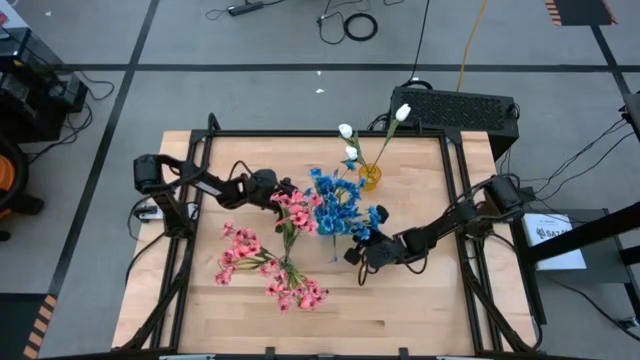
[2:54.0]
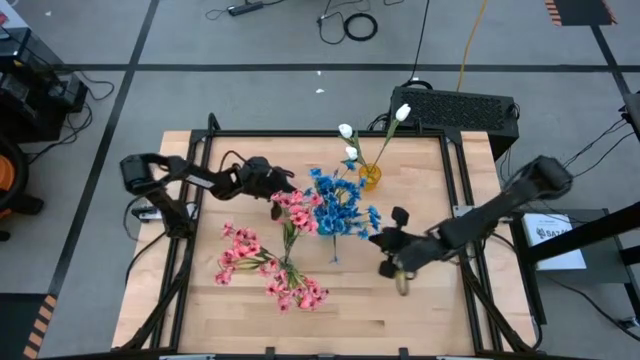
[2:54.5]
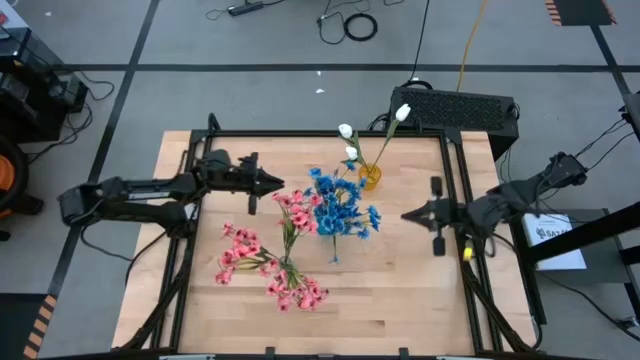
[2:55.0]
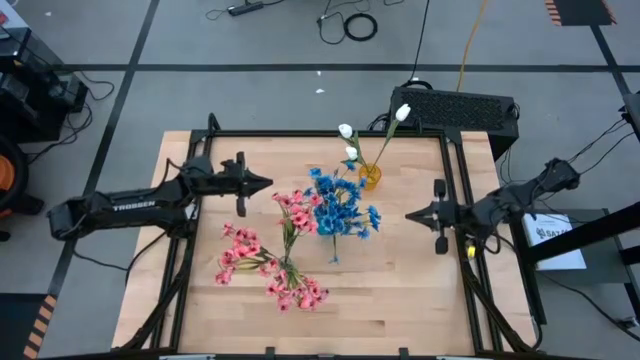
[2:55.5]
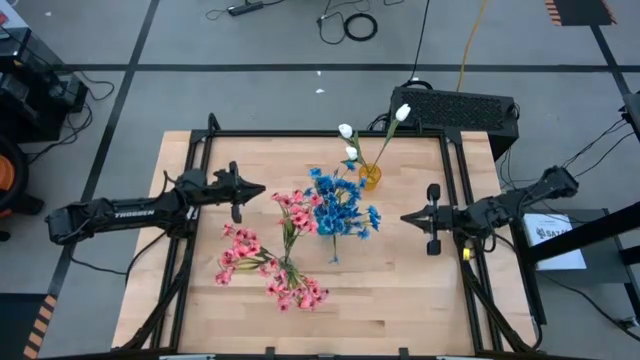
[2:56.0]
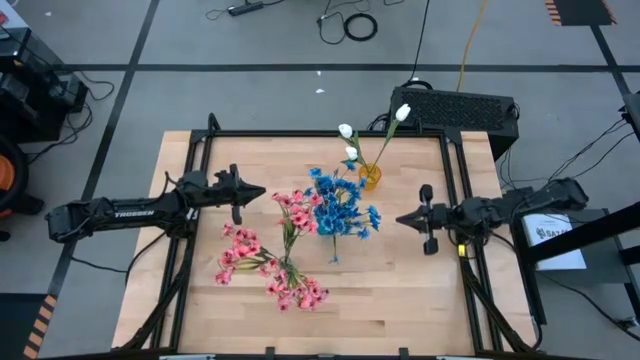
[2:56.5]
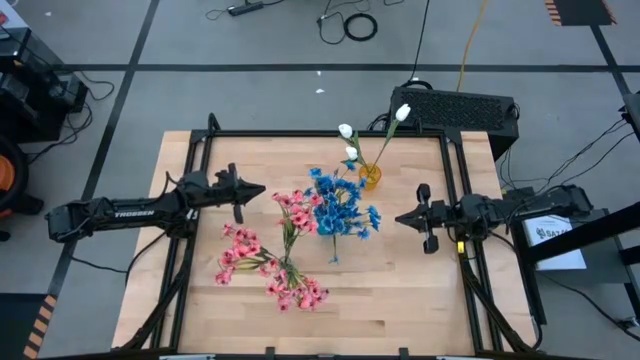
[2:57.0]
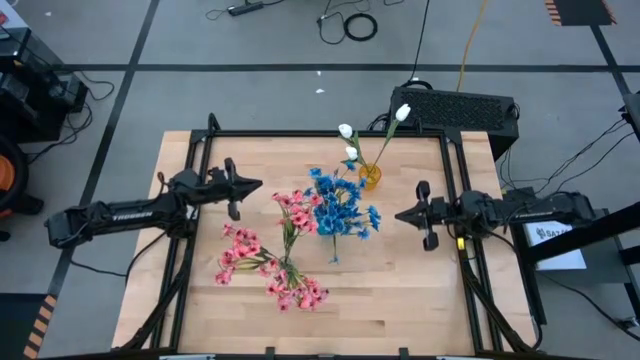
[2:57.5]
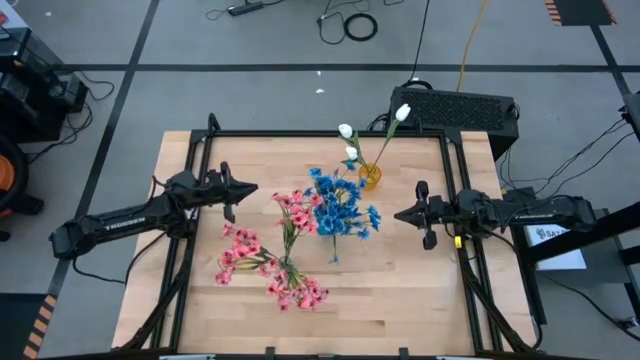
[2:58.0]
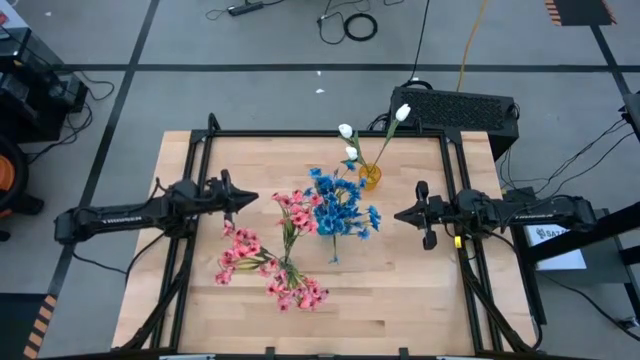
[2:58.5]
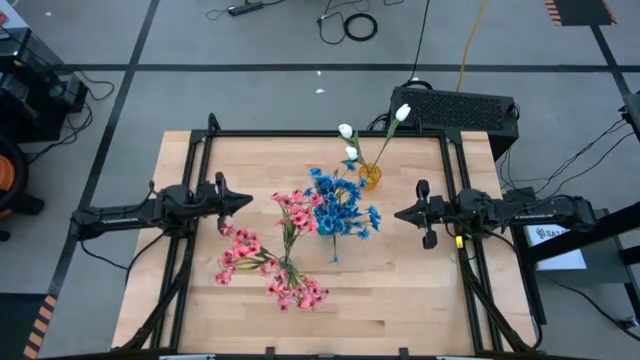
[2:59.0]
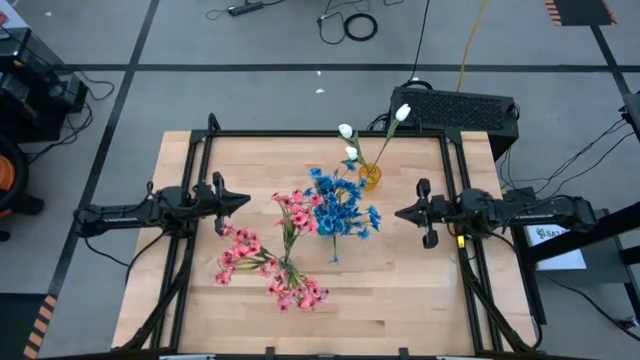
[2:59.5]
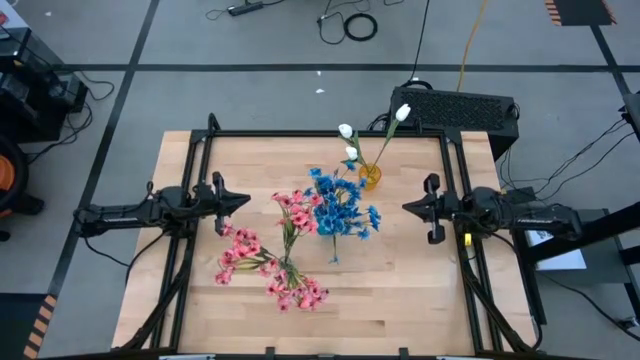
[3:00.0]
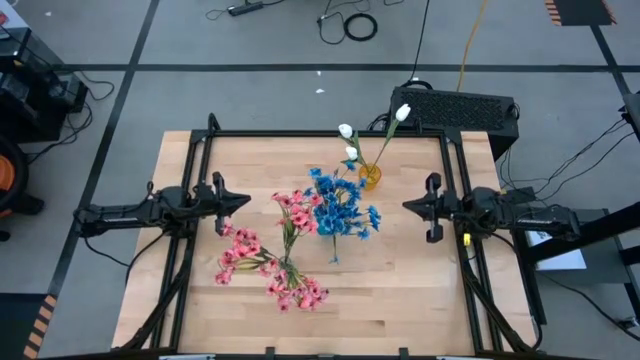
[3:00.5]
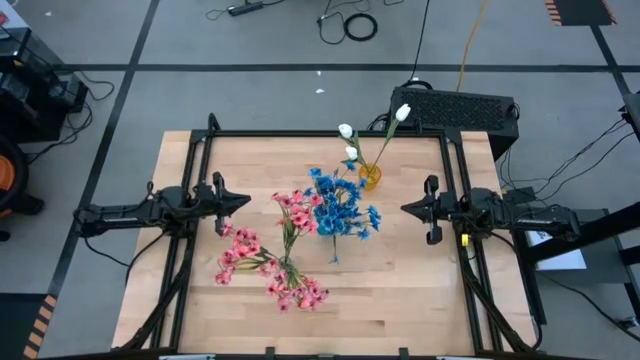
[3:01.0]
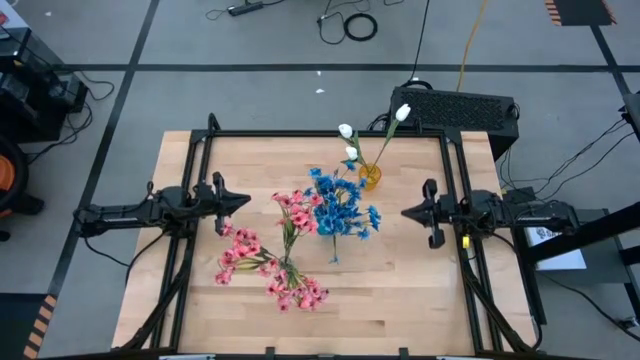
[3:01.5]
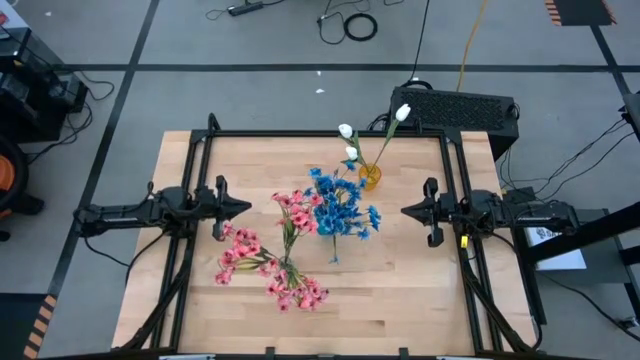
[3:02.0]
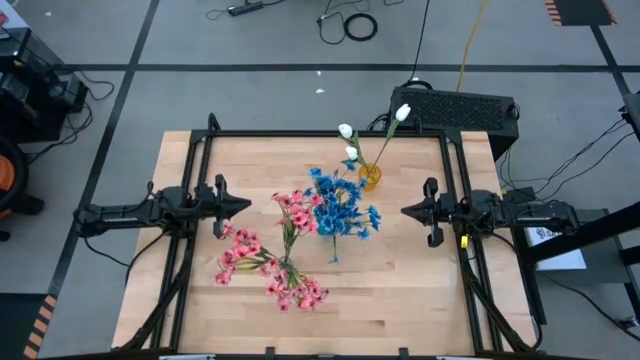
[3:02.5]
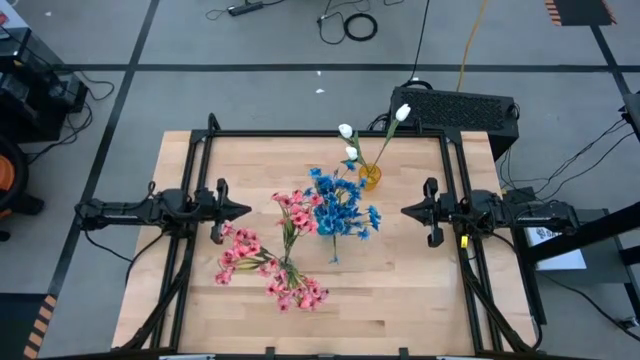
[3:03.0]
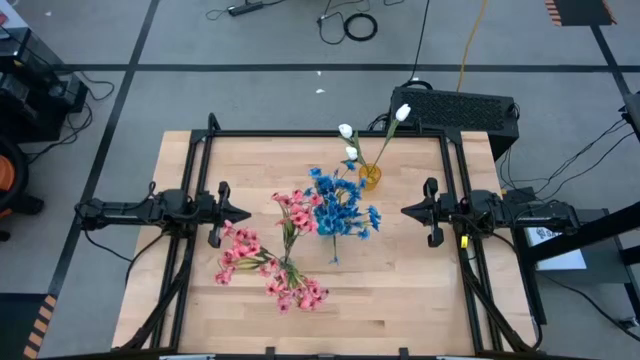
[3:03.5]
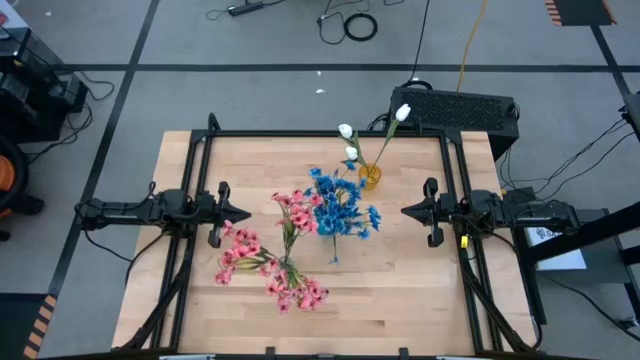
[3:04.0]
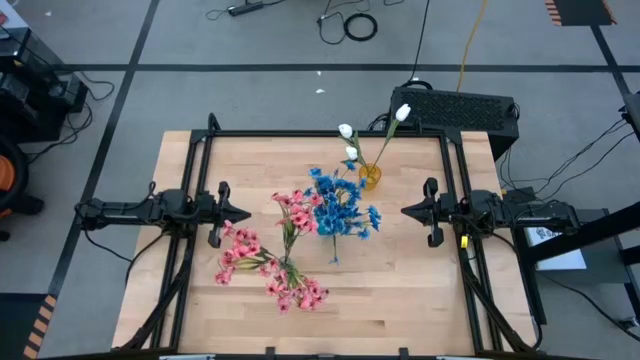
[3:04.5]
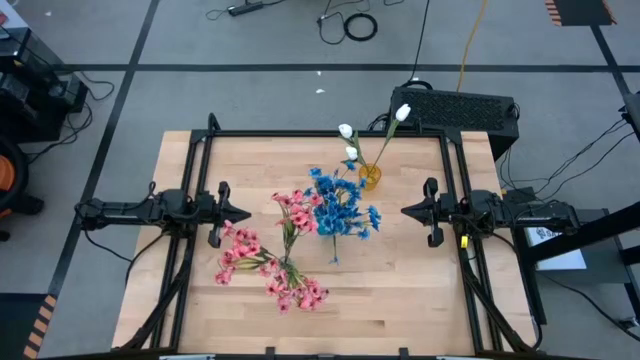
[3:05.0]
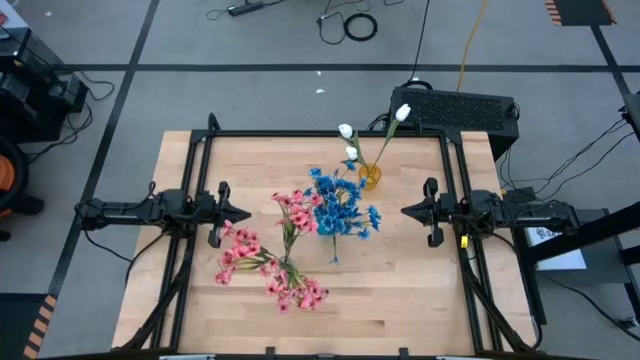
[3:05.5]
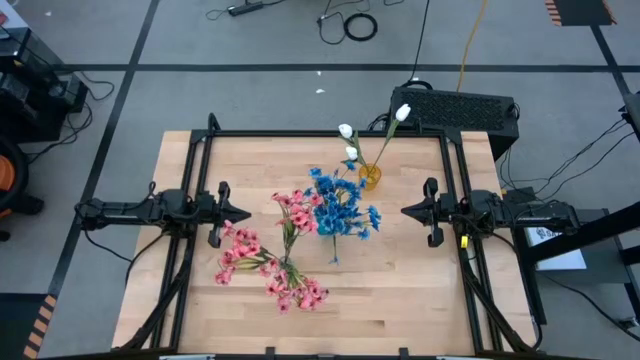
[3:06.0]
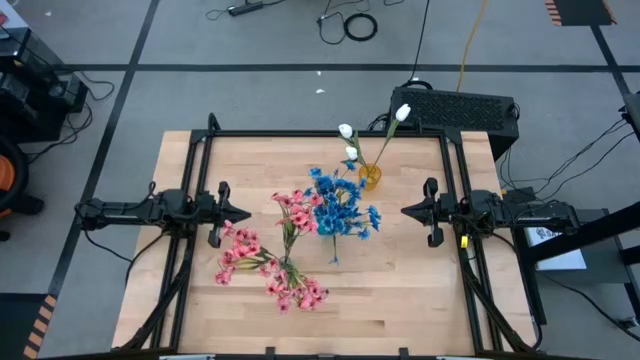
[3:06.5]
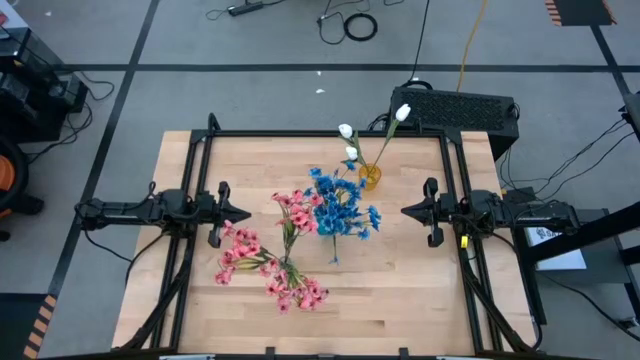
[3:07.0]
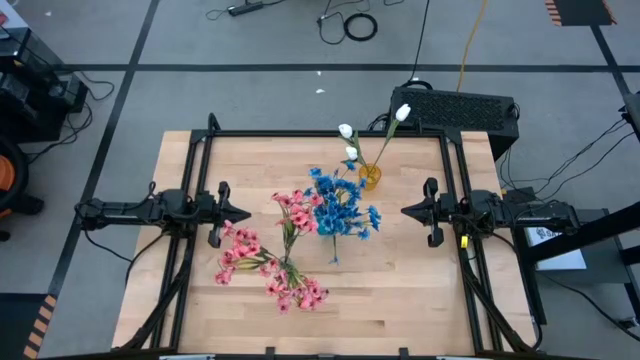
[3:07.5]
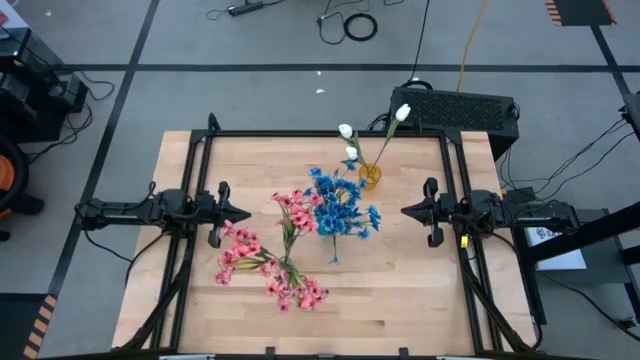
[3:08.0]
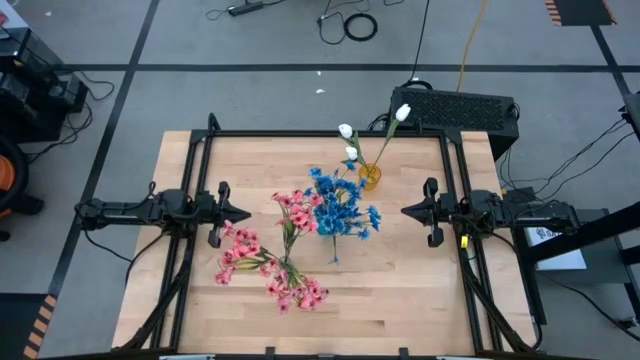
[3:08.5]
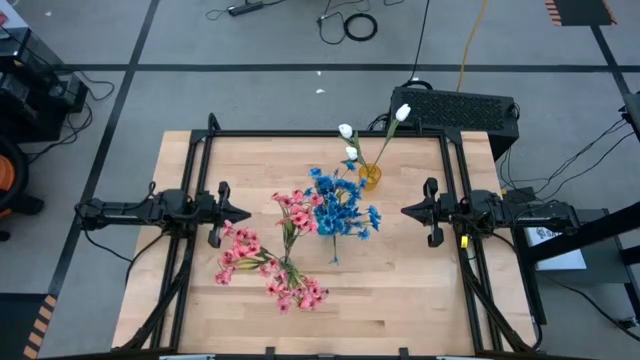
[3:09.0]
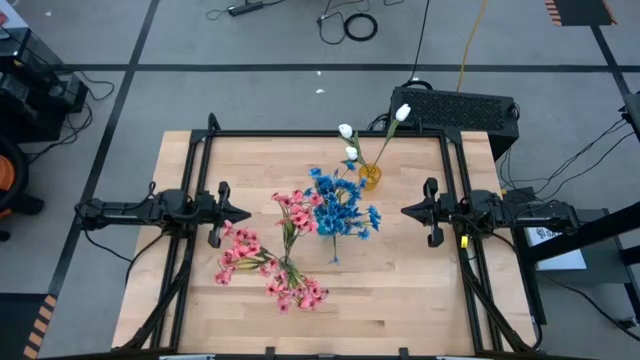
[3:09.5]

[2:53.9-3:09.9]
Task: Sort flowers into vase by color
Return to Home Position

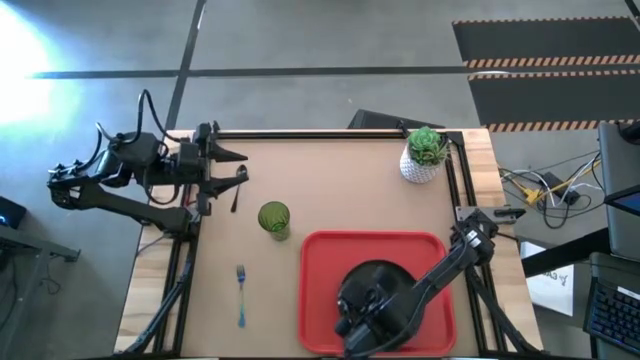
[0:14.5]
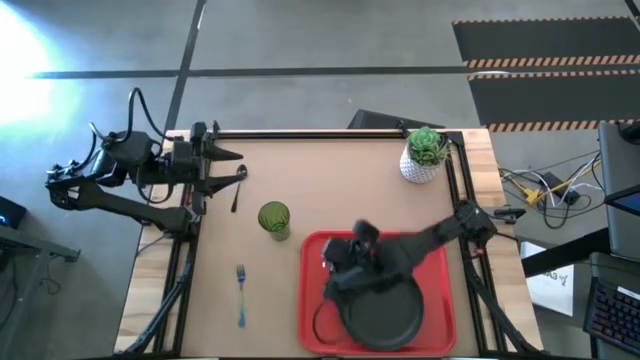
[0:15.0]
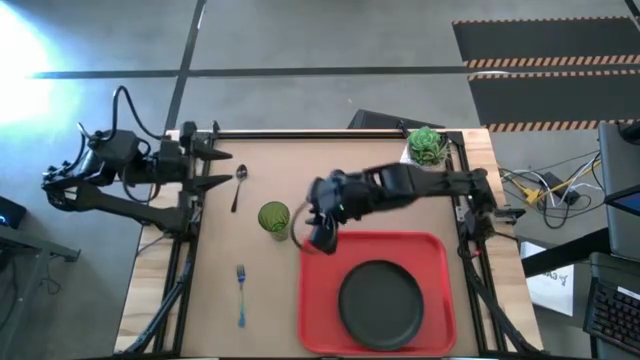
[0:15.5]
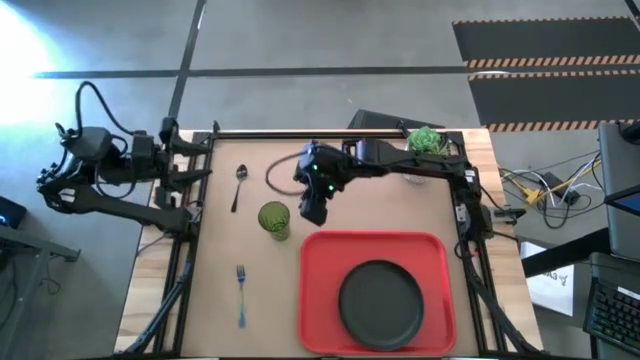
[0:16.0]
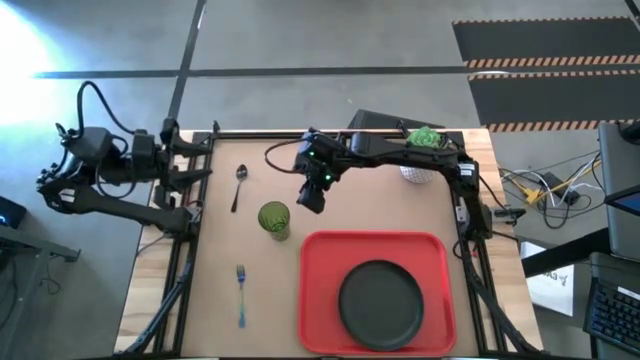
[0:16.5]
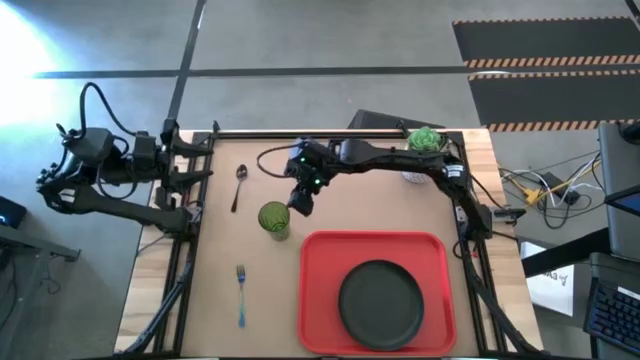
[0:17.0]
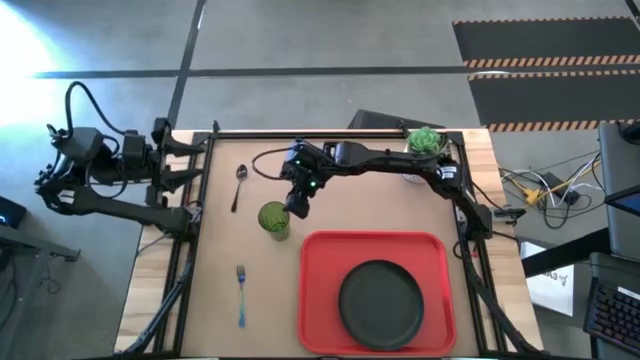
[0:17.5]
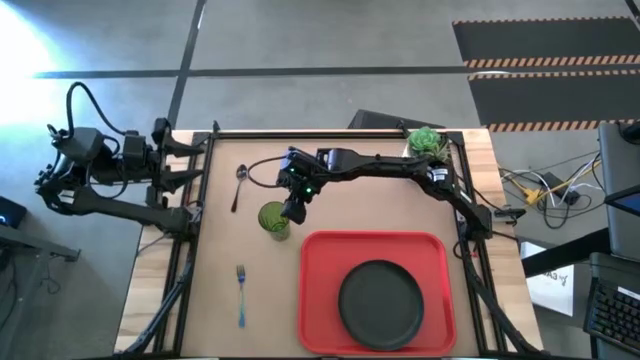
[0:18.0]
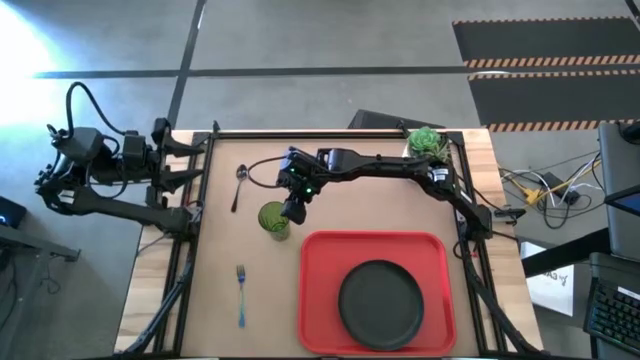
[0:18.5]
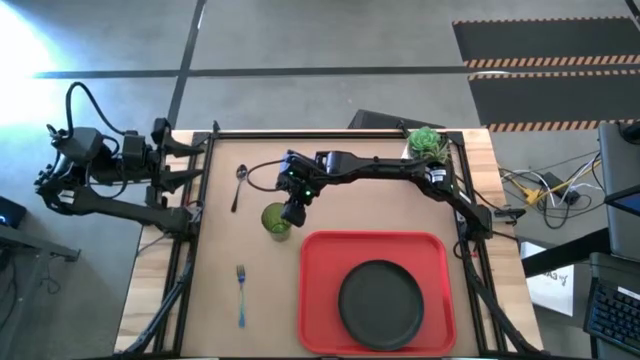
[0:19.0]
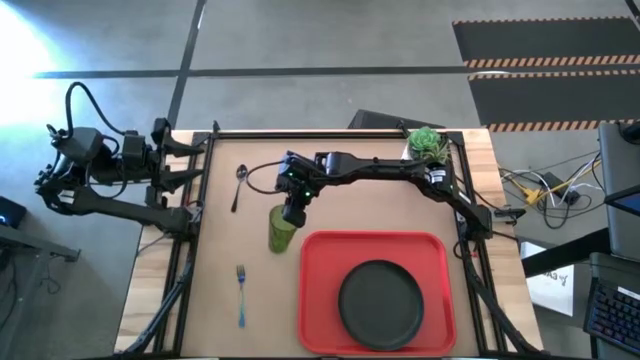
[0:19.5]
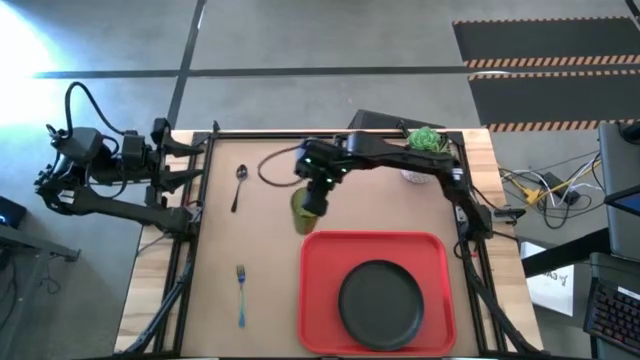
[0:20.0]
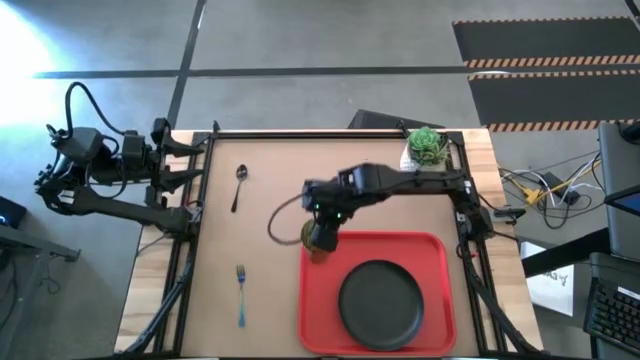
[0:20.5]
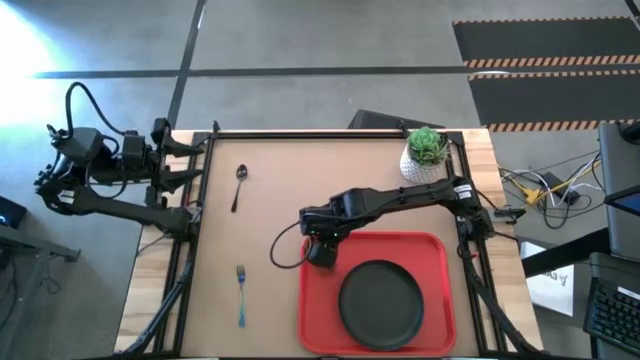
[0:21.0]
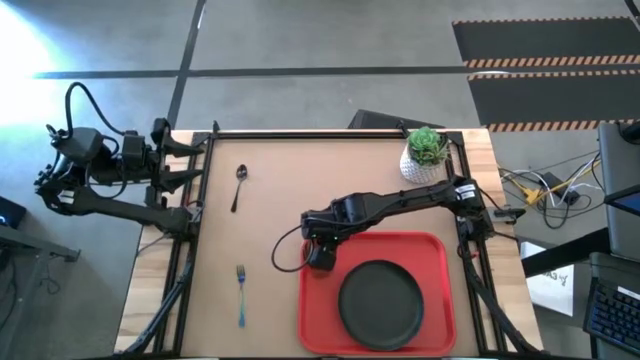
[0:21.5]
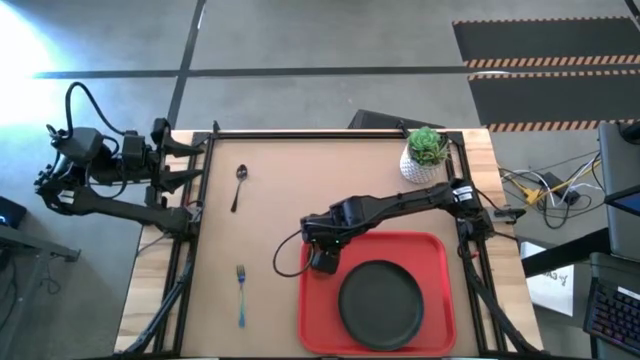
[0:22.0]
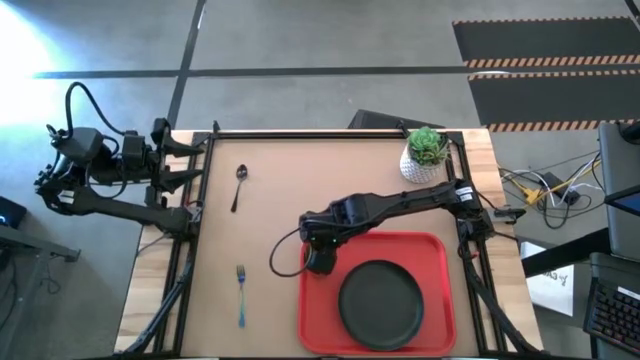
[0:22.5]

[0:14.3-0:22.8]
Task: Pick and place plate/cup/fork/spoon on tray
Put the green cup to the top left side of the black plate on the red serving tray
